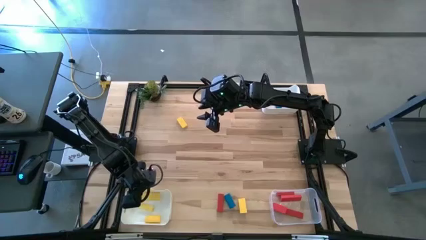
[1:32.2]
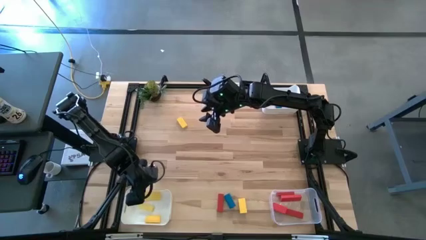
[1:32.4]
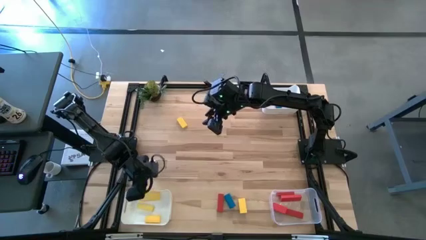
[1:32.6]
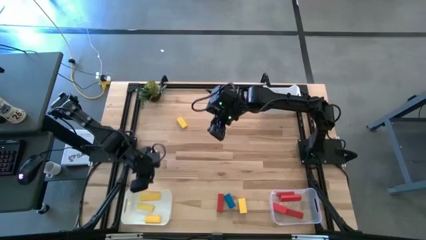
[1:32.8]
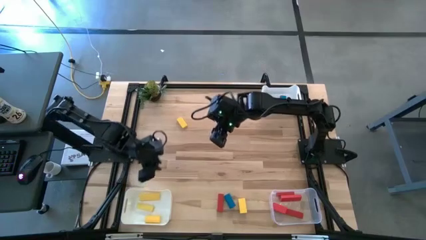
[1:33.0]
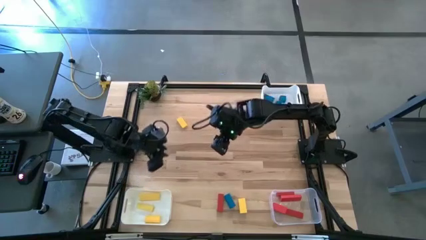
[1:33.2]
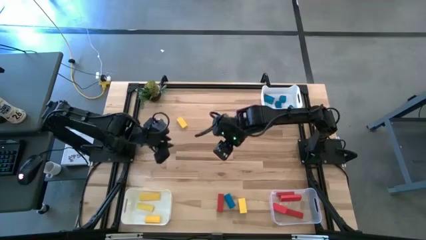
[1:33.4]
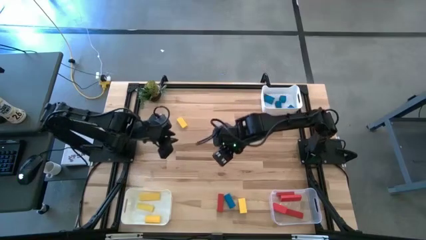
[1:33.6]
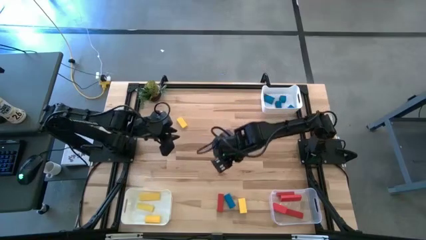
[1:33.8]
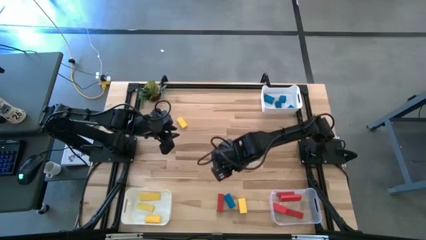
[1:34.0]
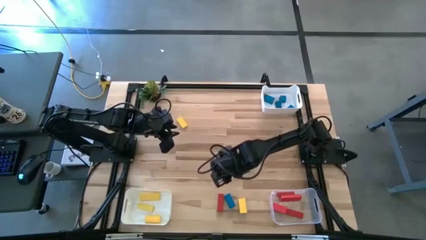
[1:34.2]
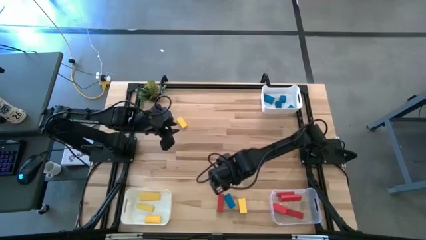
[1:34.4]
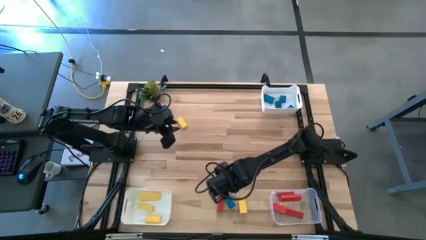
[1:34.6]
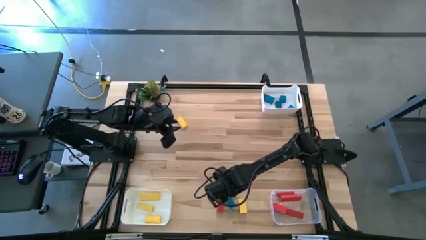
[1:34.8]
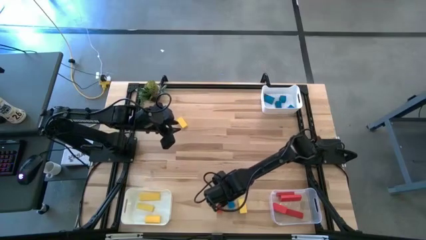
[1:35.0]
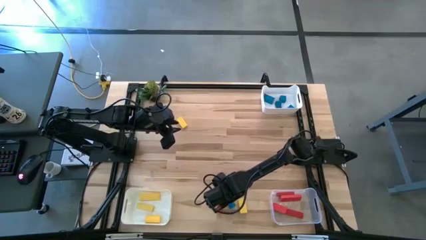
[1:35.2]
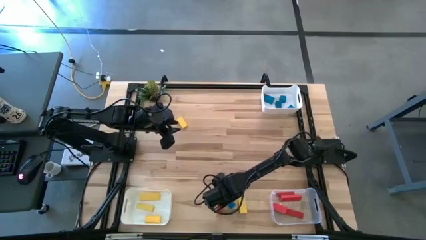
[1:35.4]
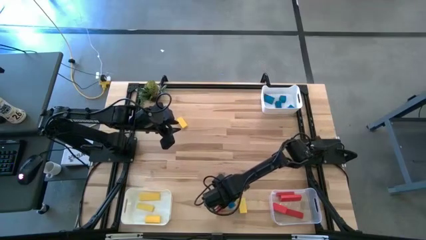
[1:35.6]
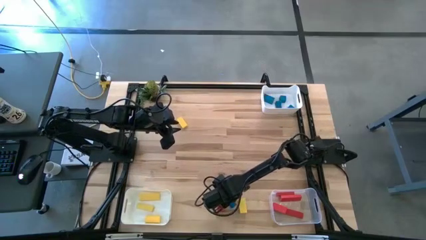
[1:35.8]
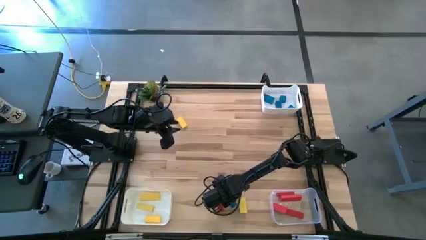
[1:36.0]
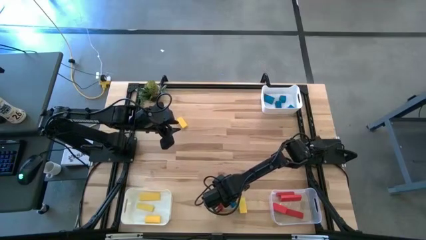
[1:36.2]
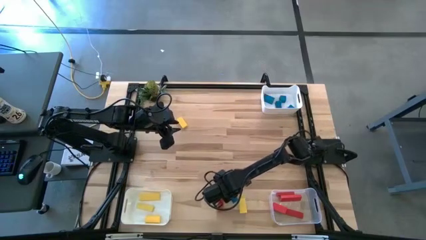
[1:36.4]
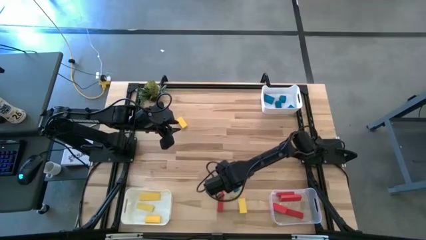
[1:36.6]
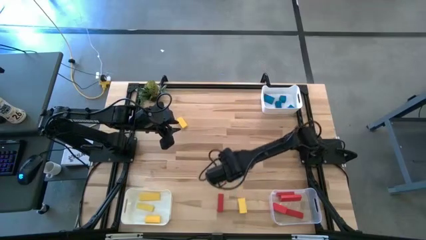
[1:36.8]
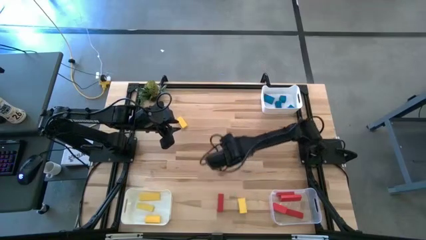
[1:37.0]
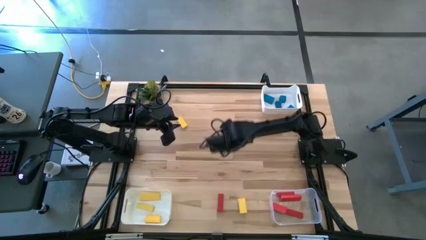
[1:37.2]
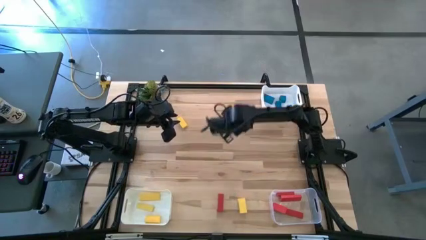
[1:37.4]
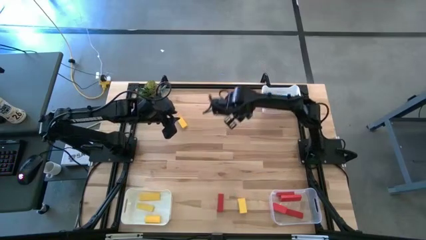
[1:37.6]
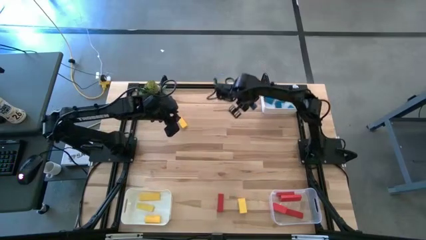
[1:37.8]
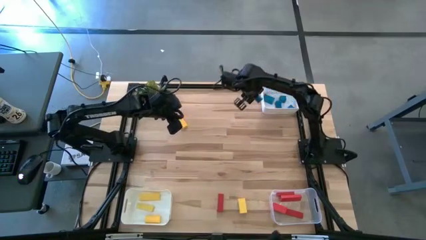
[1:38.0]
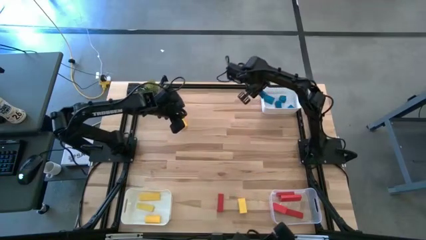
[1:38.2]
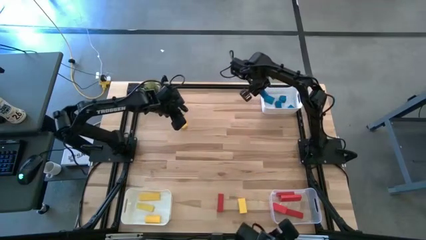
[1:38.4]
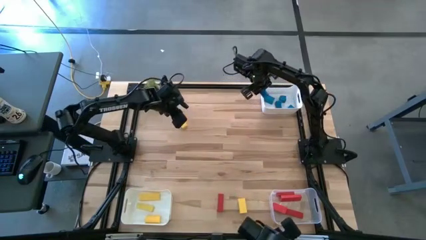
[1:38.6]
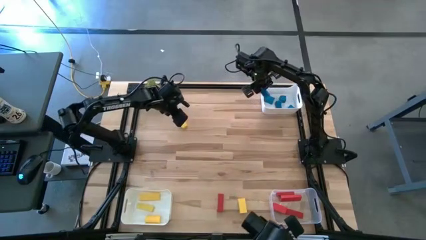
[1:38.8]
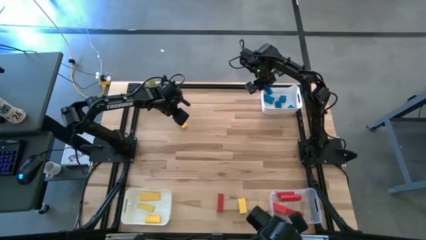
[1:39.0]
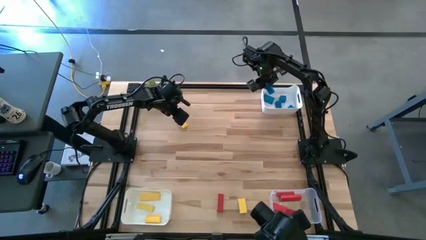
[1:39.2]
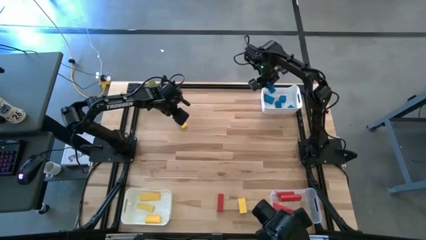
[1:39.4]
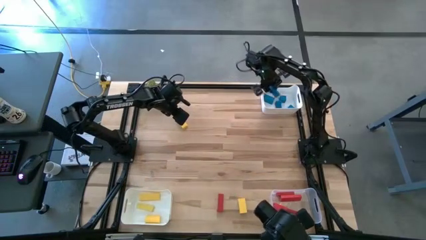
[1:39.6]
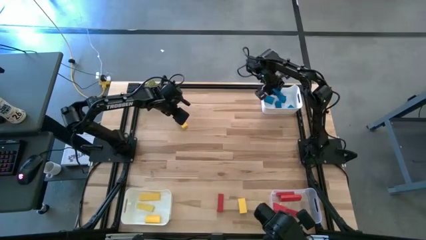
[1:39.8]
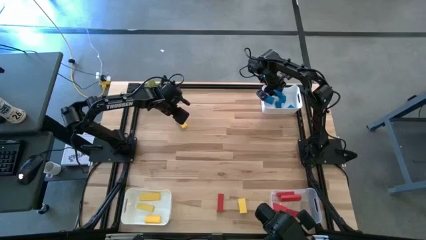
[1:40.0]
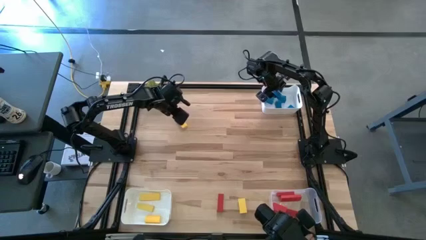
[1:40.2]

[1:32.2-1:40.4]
Task: Sort & place blocks by color
Put the blue block into the top white bin

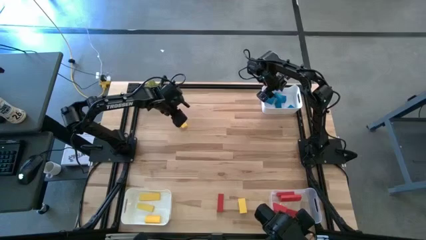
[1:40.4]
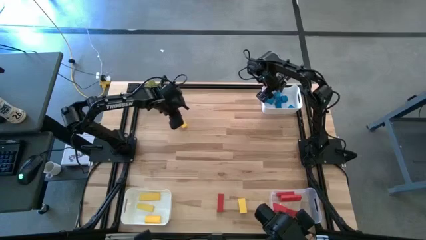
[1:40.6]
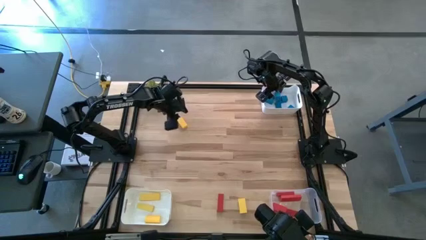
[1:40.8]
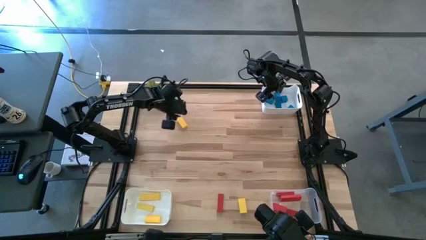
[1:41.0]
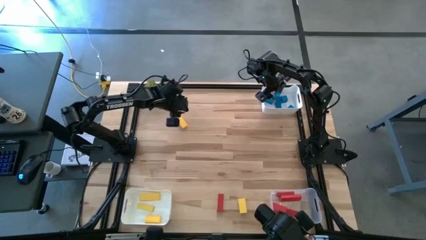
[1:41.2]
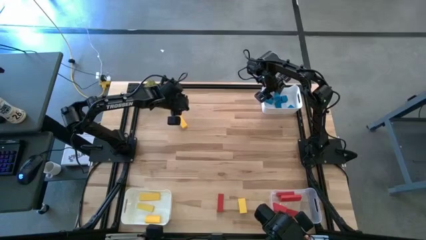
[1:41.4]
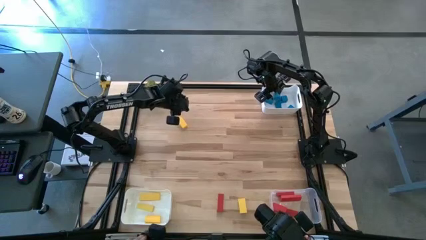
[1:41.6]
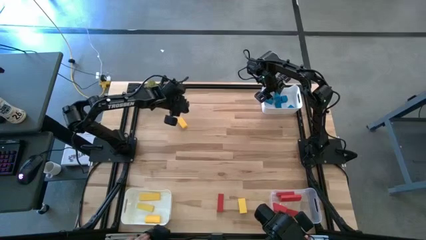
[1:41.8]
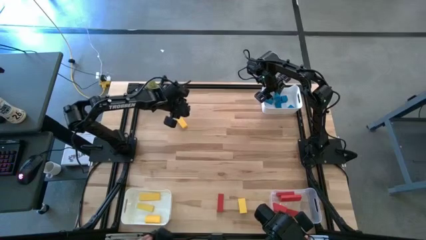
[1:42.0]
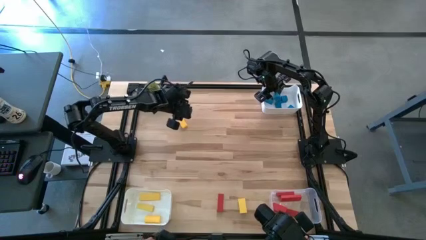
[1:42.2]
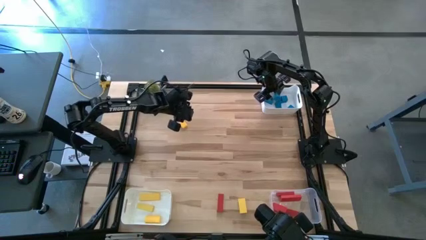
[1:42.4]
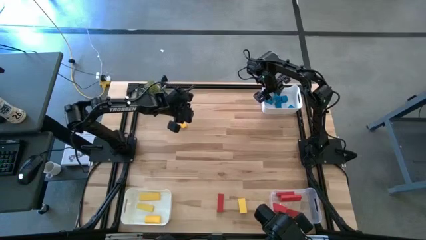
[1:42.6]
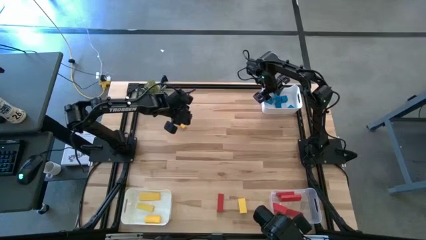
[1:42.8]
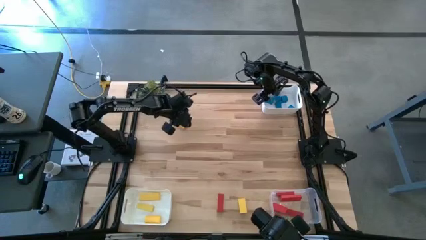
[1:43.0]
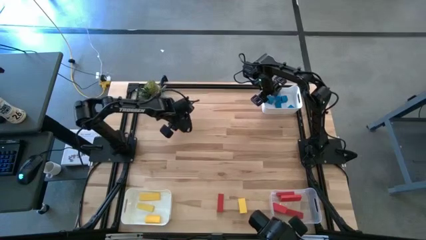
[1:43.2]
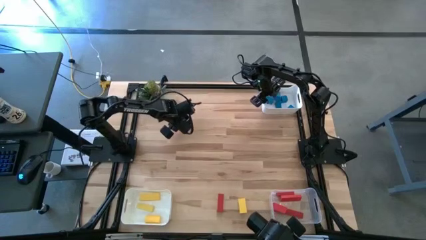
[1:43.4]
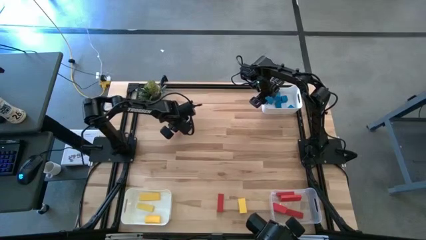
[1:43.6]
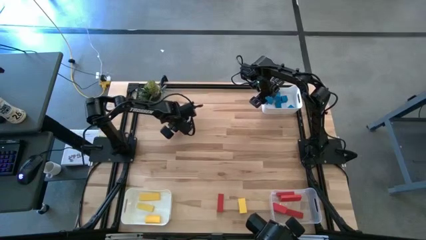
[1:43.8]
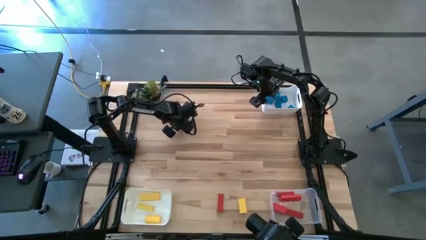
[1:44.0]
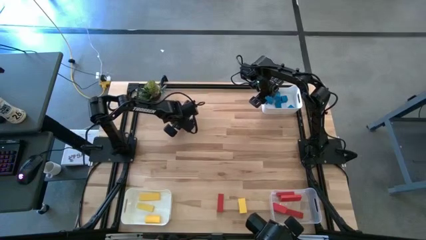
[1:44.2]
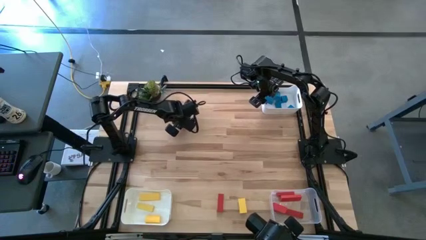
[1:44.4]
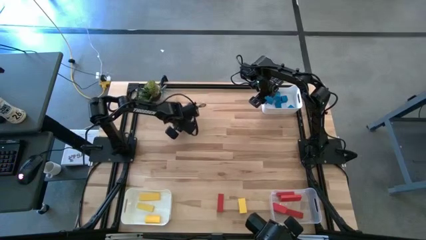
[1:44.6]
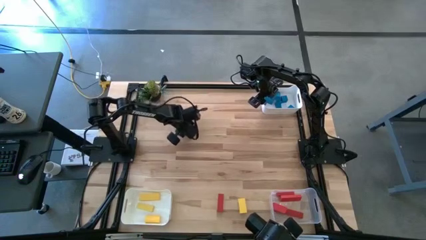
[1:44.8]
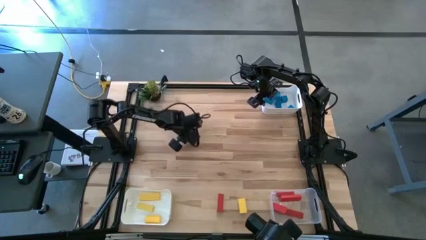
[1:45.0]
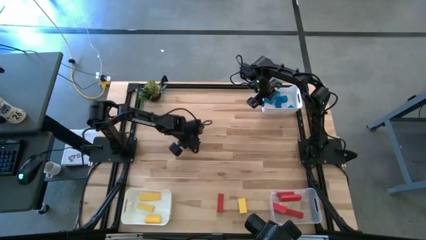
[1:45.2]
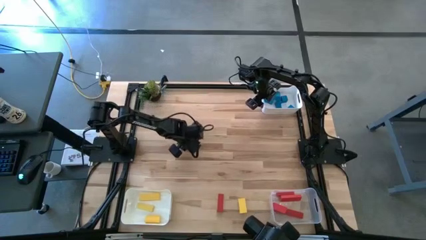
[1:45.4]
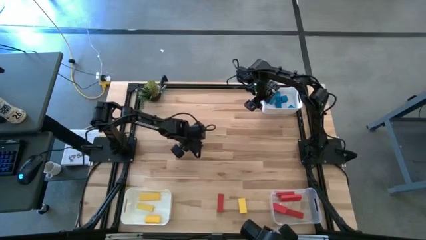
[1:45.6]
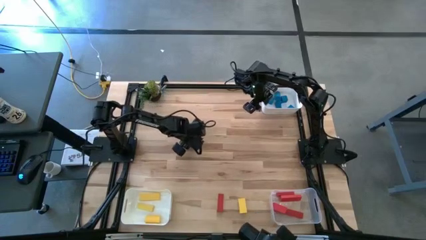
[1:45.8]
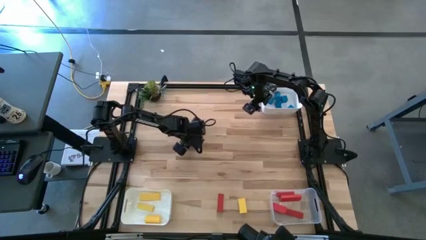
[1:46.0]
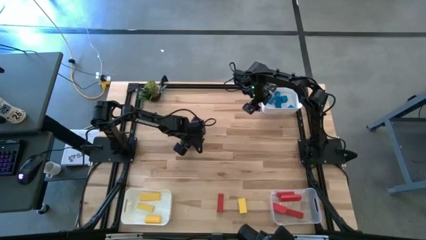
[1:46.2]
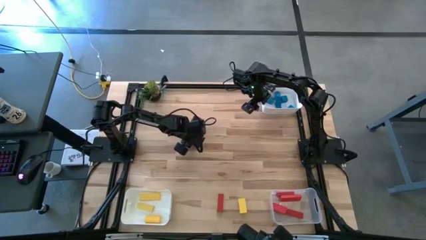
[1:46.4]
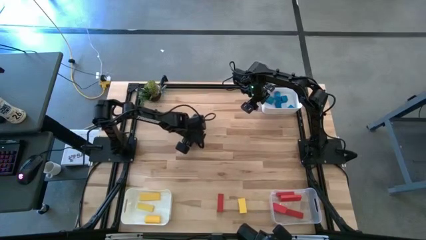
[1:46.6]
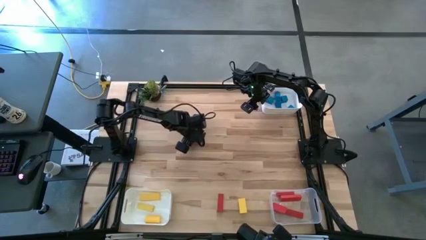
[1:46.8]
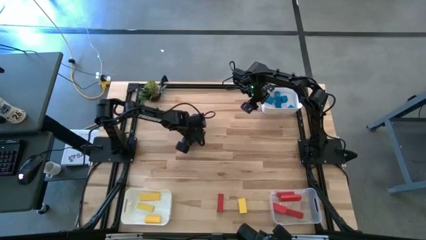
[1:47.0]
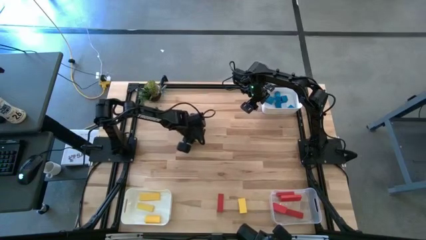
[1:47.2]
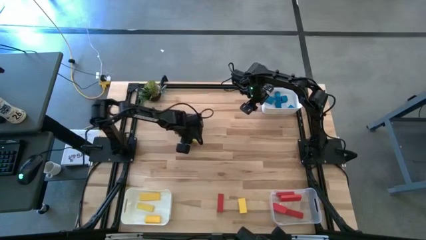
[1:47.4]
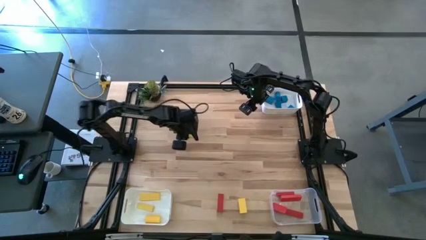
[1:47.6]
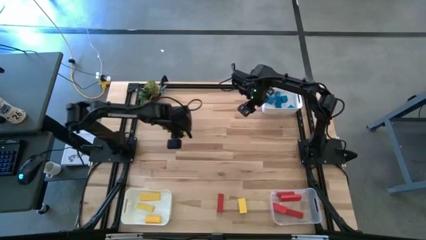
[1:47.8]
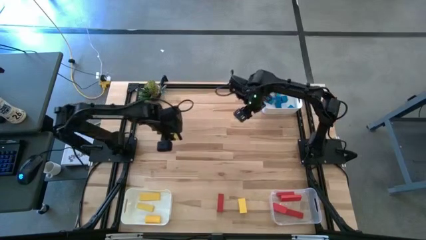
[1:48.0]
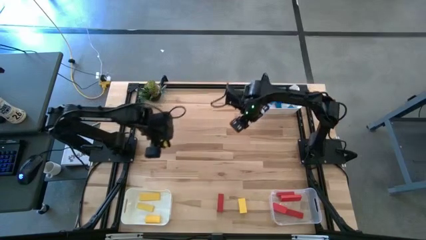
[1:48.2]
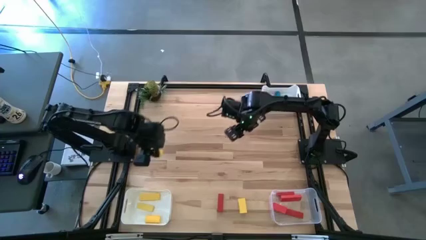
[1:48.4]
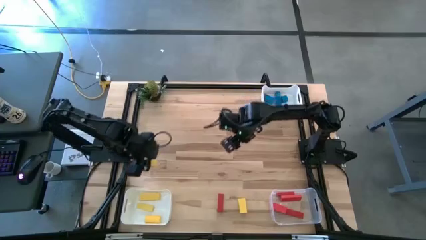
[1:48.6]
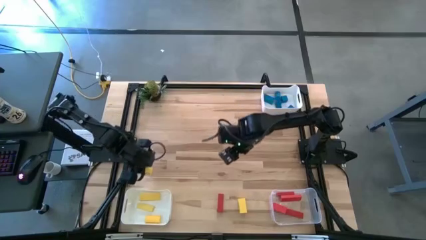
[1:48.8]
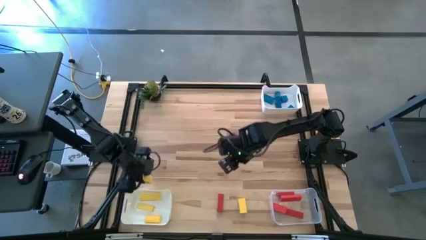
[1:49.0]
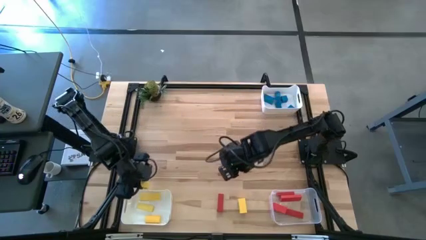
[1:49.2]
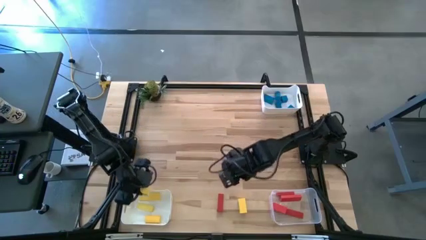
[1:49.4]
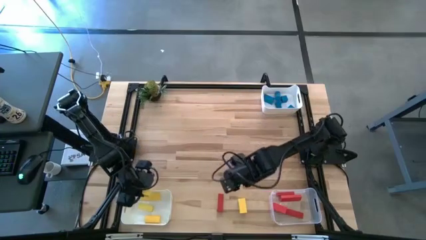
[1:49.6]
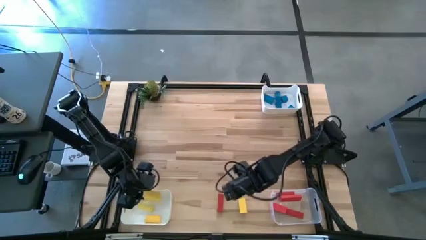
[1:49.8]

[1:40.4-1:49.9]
Put the yellow block into the bottom white bin
